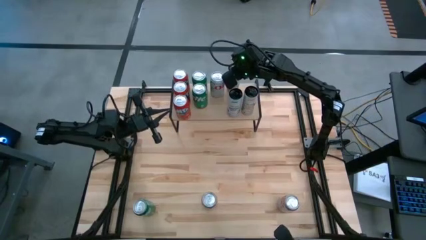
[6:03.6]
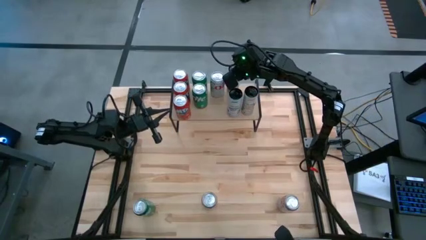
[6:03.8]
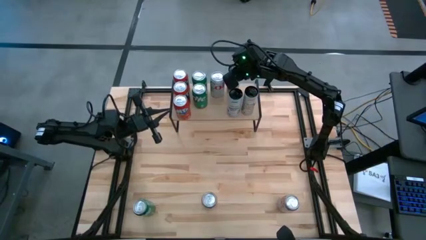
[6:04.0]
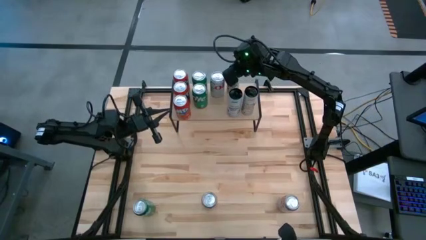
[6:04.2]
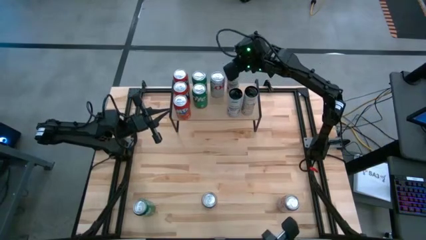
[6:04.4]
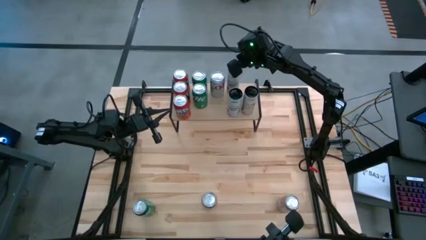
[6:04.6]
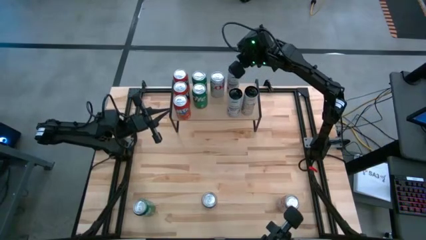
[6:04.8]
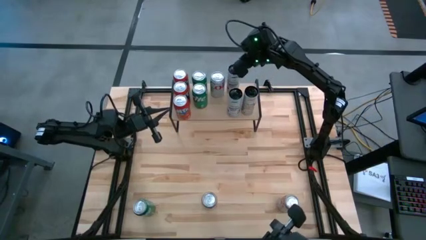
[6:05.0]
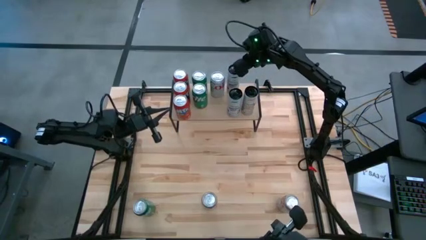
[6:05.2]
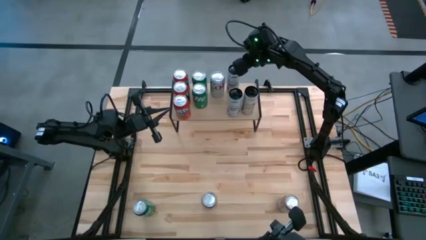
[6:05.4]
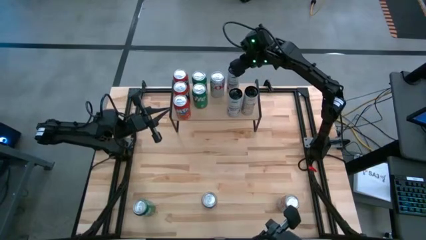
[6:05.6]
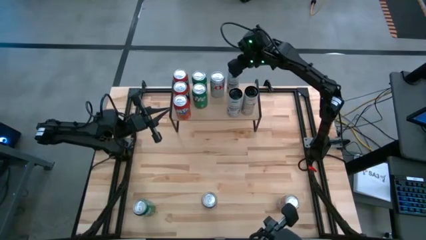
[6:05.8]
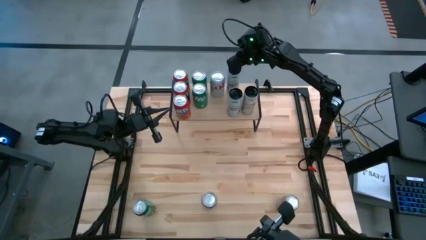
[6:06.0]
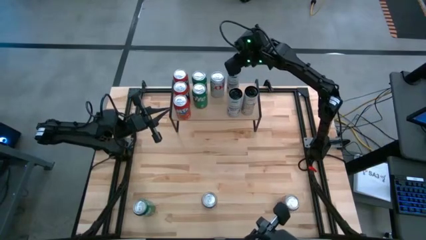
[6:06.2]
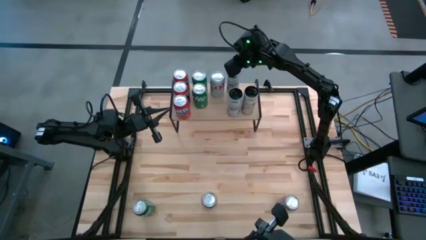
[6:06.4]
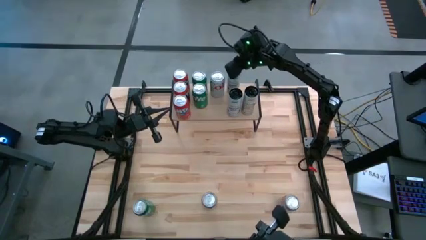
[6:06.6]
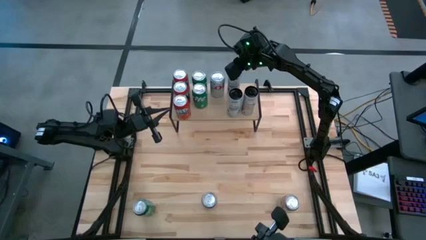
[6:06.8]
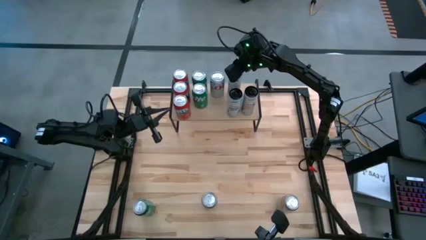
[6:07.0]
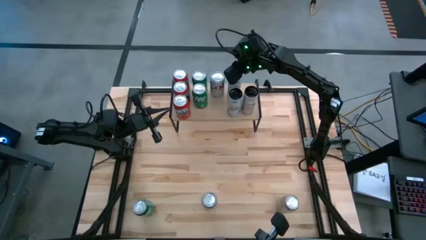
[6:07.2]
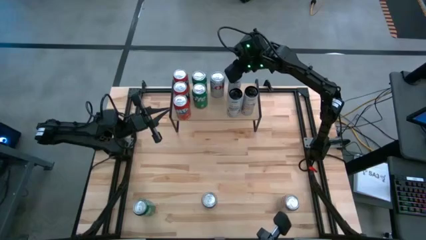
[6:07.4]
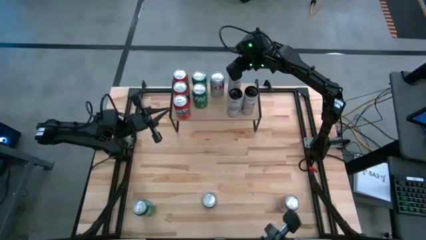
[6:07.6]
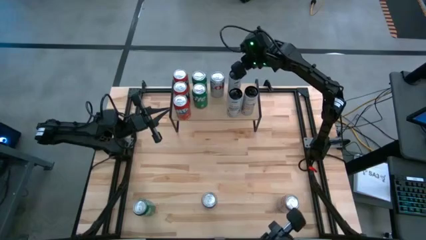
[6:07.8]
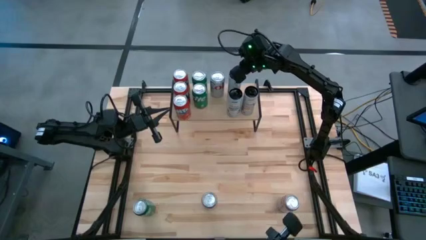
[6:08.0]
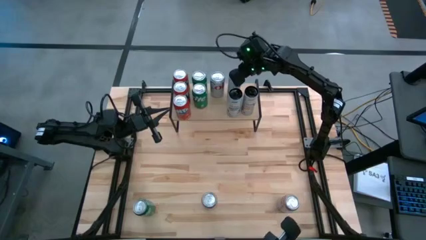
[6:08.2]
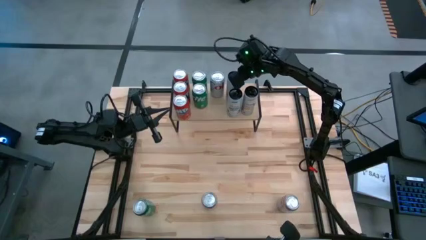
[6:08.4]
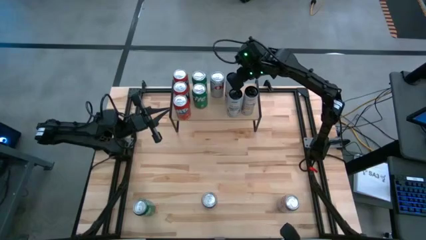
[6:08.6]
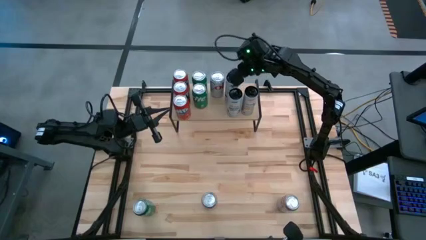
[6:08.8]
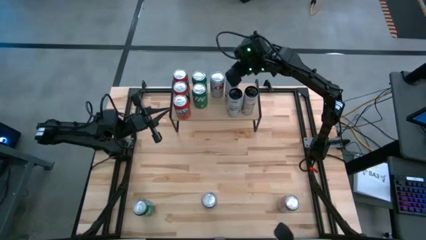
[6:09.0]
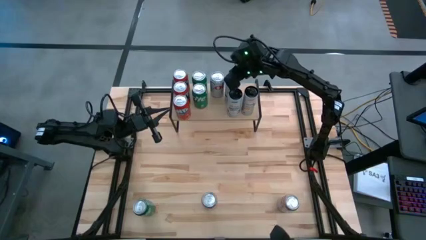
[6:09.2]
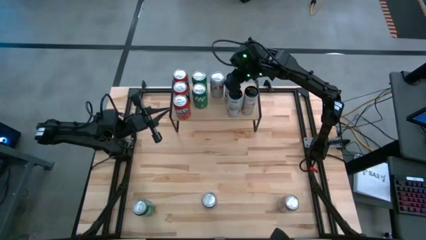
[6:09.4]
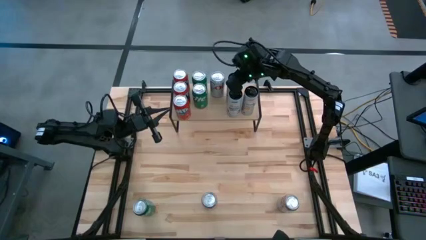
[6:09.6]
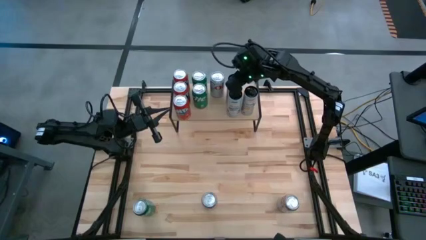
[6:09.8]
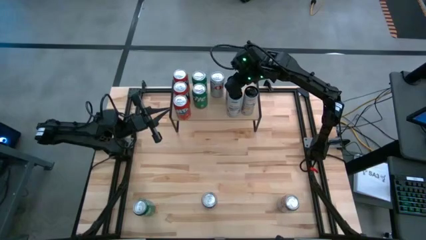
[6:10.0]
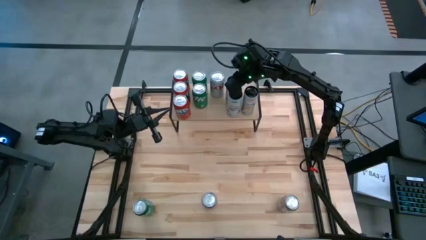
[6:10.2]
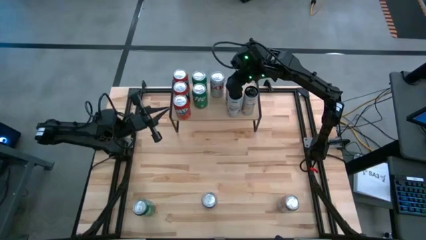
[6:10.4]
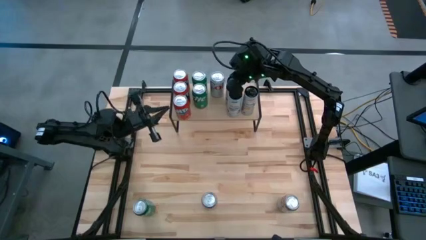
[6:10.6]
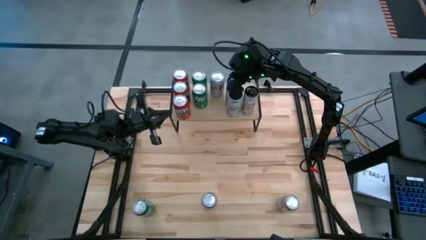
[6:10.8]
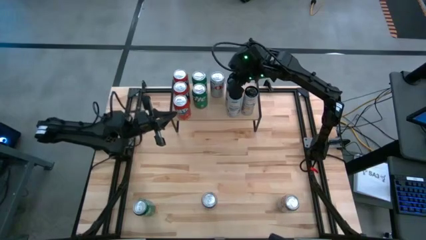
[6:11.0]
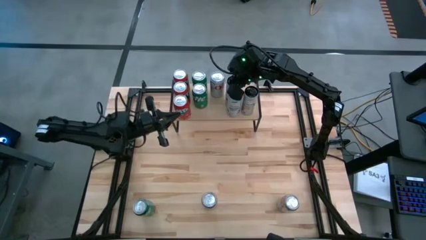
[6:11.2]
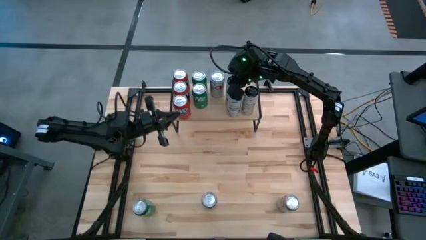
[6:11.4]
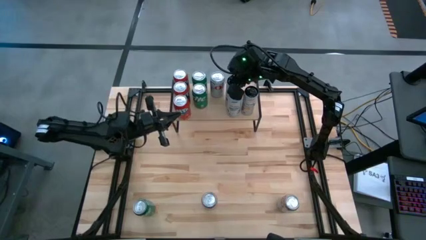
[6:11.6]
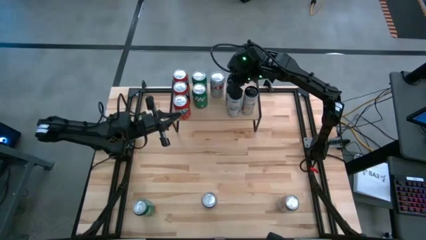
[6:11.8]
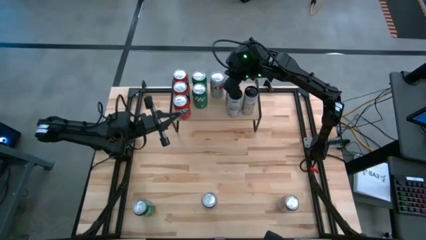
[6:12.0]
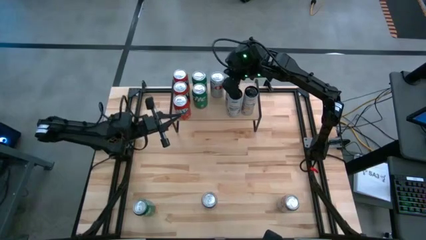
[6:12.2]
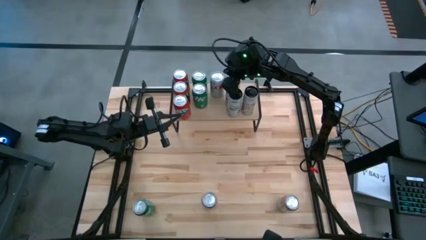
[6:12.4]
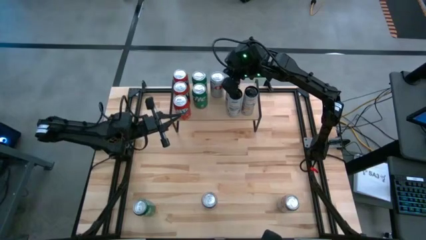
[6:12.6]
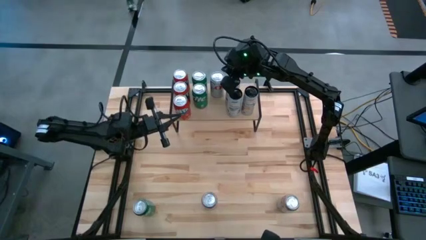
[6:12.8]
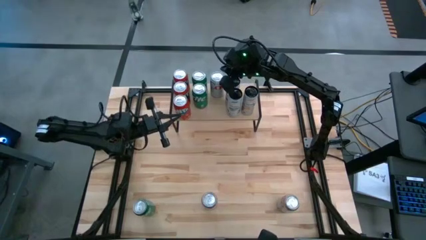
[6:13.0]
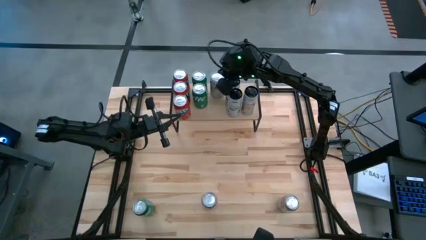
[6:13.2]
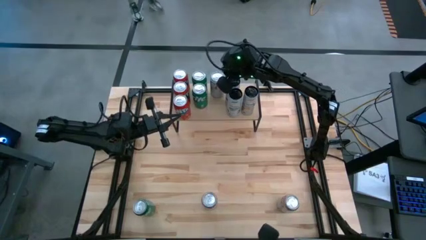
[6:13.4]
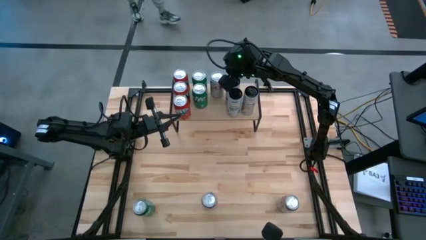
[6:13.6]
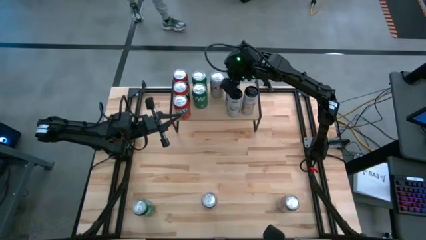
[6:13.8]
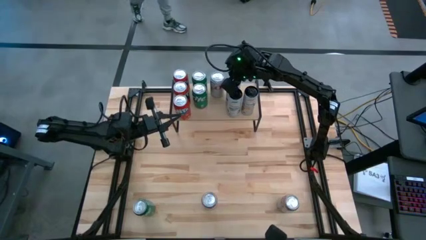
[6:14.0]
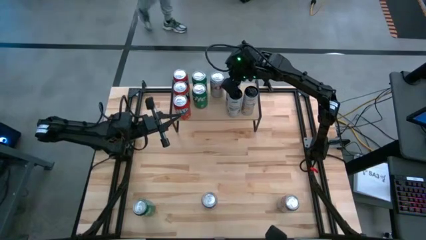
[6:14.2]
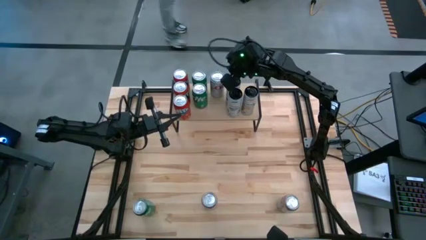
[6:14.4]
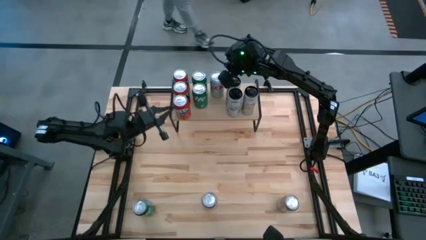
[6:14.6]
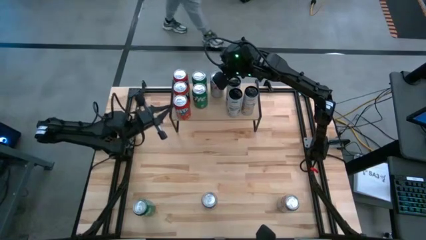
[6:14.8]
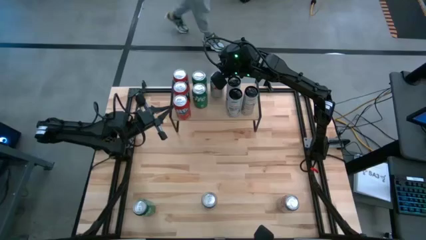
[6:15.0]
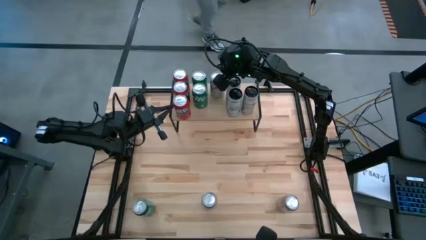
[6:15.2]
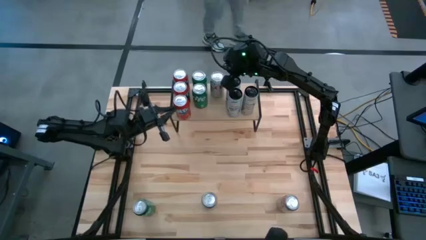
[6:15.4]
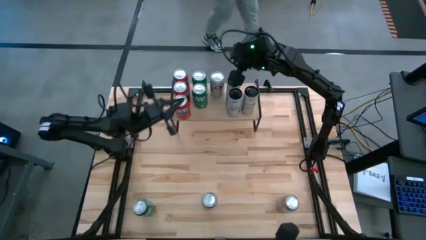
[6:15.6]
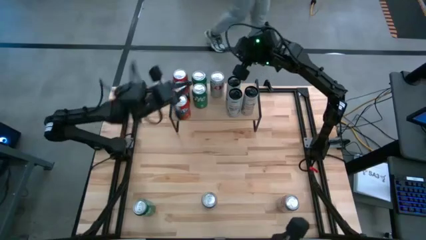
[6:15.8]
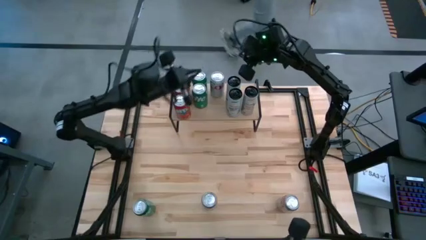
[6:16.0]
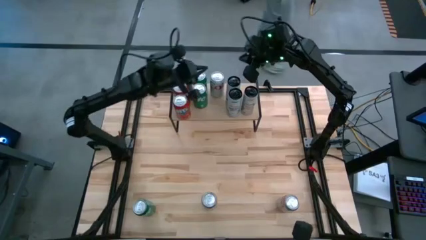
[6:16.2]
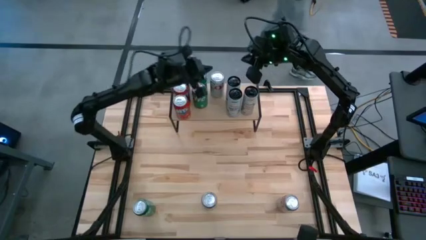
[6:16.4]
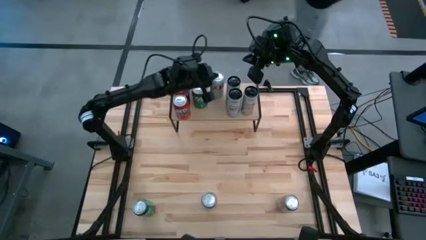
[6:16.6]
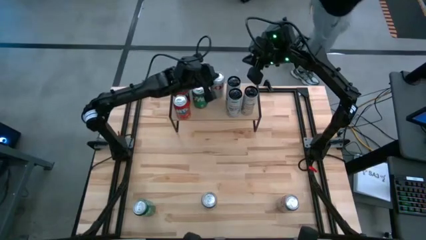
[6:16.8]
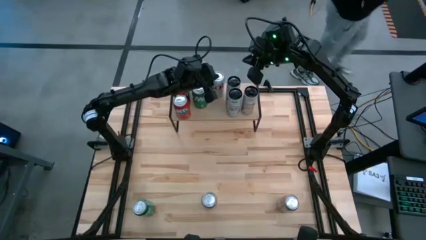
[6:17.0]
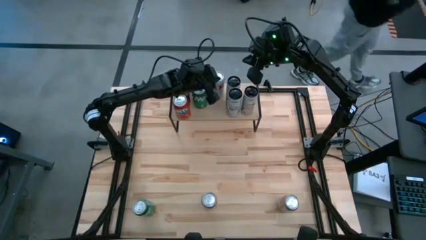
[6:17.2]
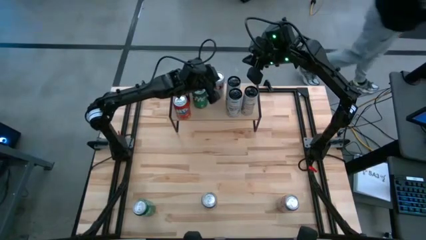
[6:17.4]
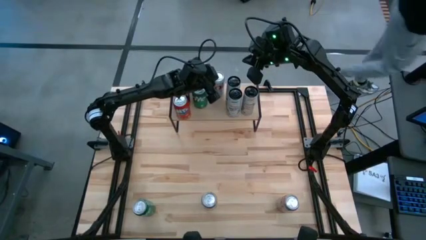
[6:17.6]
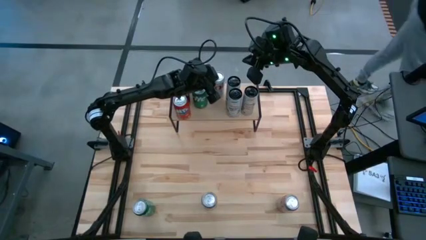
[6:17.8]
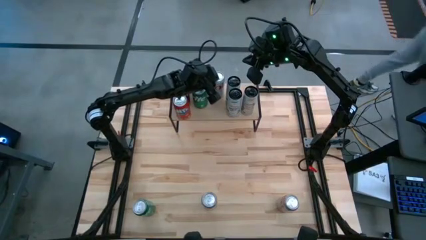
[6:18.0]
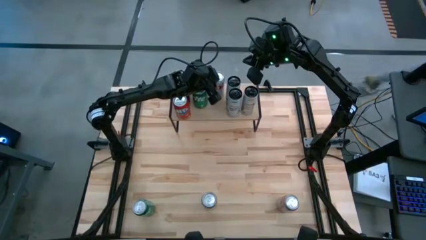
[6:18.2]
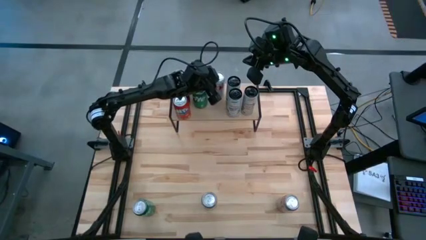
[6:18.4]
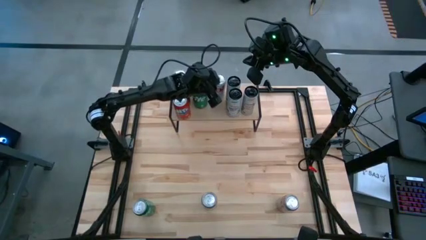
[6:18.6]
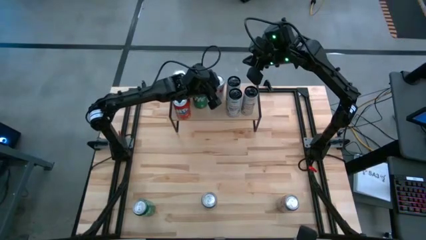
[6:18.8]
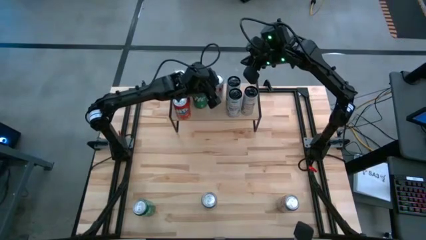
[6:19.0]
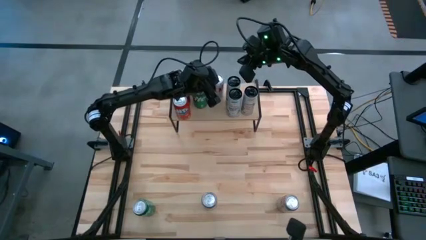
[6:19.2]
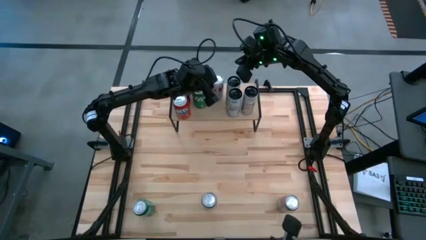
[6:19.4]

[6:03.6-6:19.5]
Task: Place canned beverage on shelf
Adjust the soda cans on the shelf
